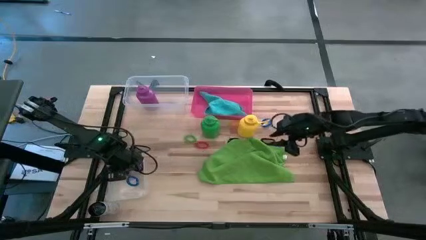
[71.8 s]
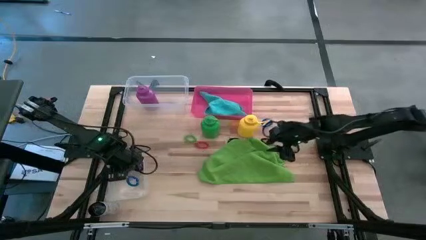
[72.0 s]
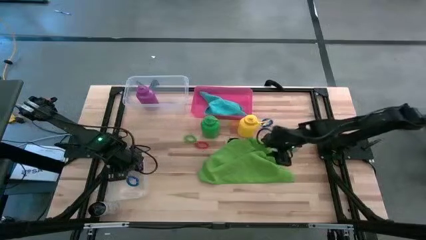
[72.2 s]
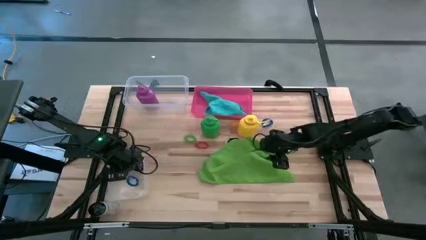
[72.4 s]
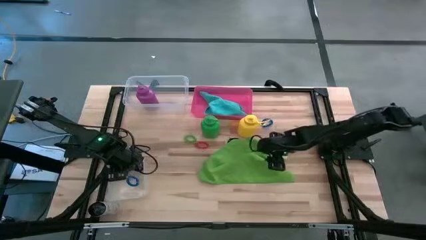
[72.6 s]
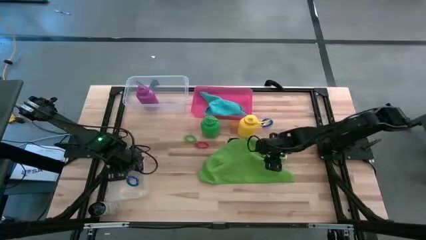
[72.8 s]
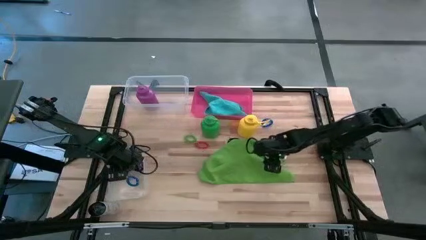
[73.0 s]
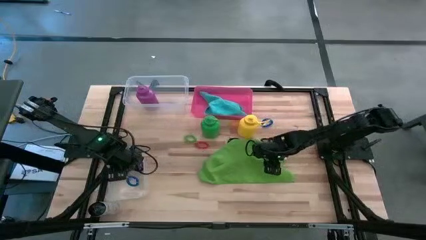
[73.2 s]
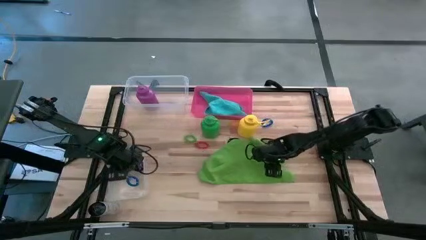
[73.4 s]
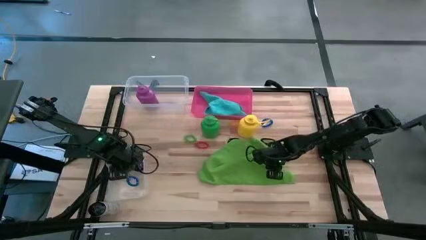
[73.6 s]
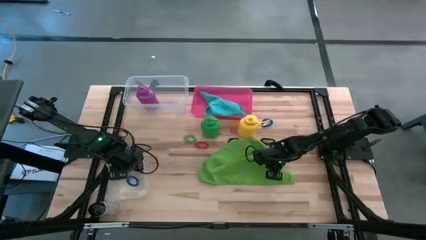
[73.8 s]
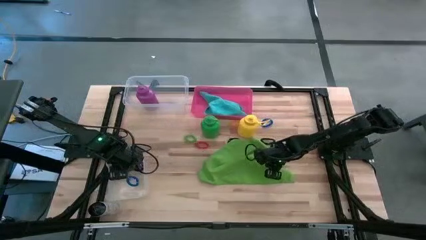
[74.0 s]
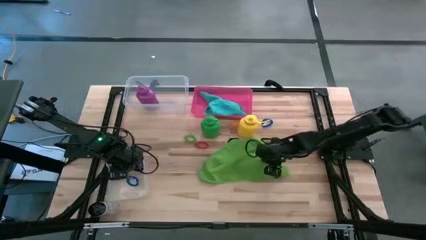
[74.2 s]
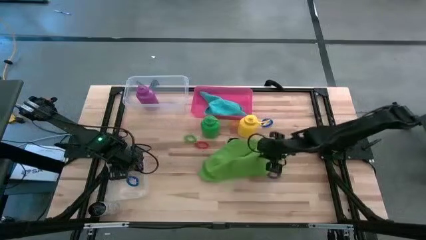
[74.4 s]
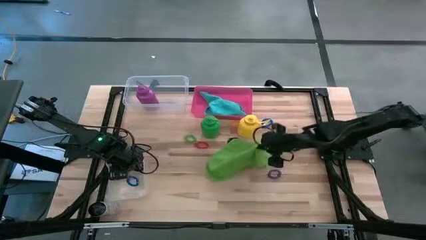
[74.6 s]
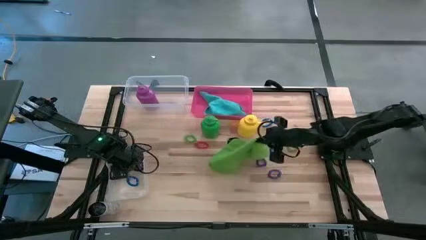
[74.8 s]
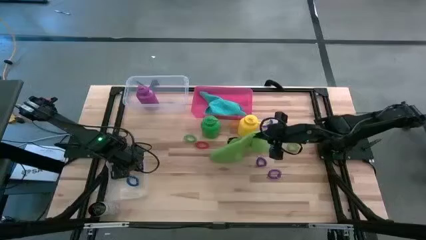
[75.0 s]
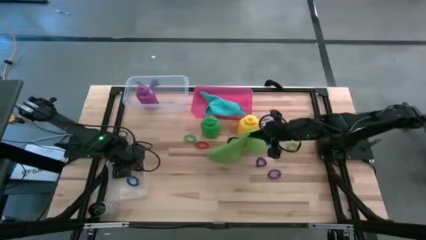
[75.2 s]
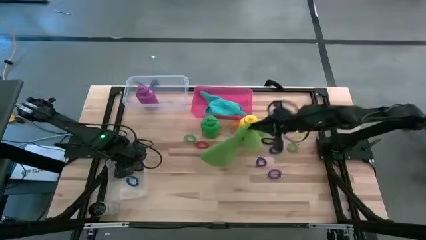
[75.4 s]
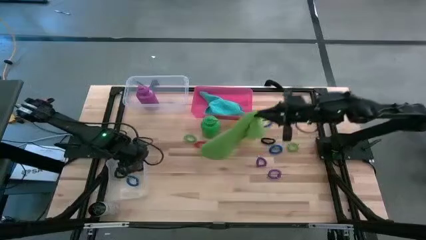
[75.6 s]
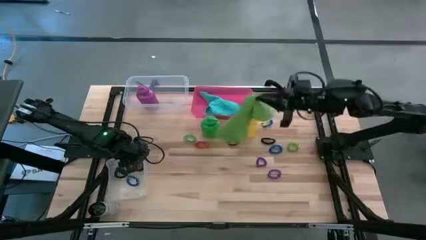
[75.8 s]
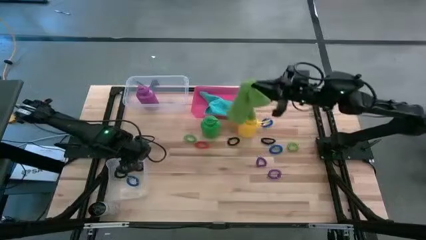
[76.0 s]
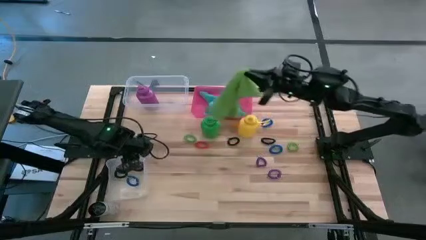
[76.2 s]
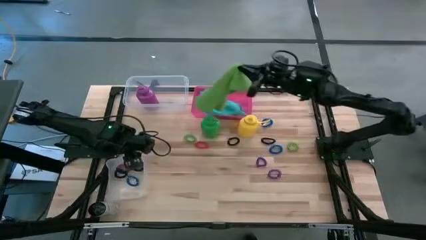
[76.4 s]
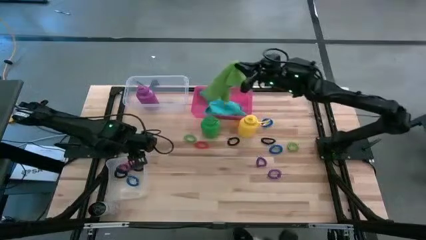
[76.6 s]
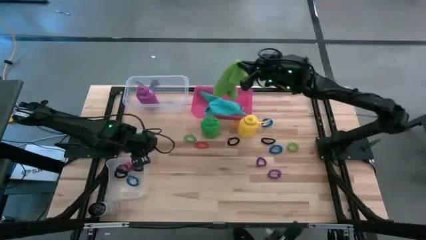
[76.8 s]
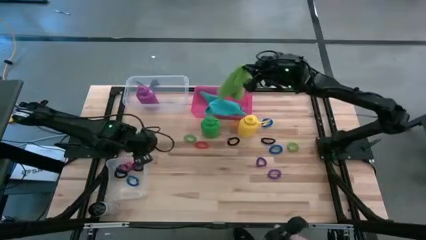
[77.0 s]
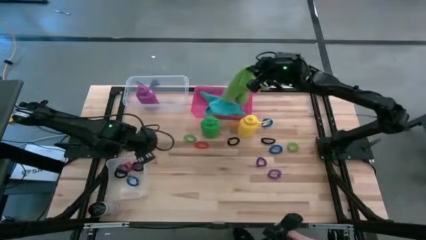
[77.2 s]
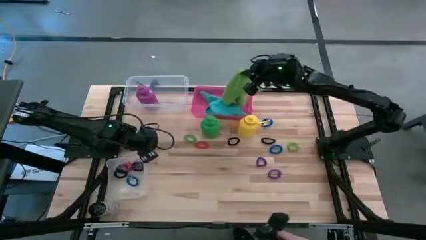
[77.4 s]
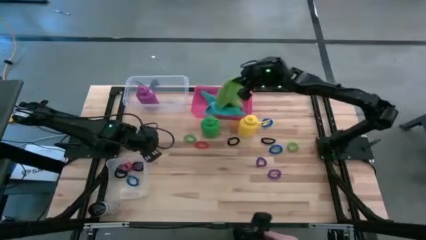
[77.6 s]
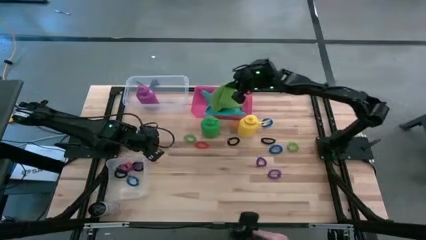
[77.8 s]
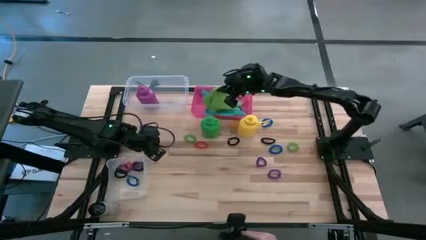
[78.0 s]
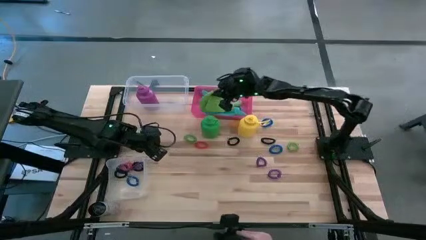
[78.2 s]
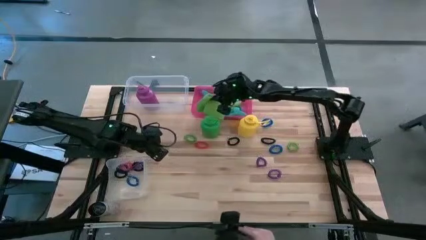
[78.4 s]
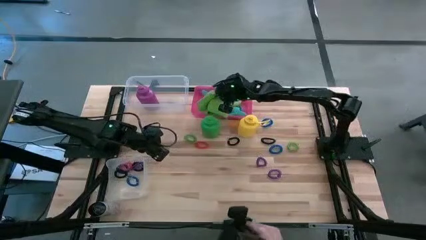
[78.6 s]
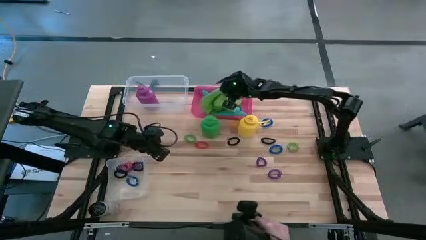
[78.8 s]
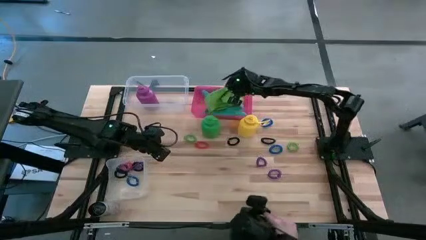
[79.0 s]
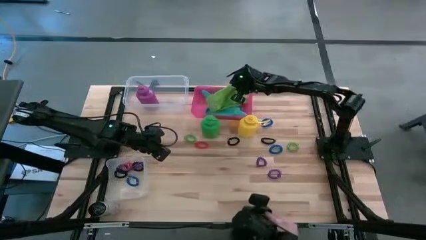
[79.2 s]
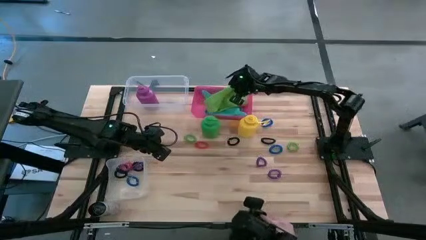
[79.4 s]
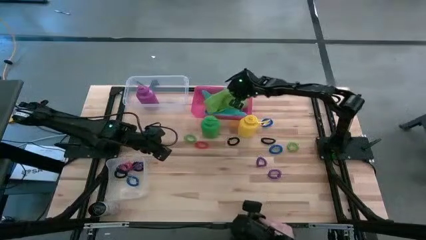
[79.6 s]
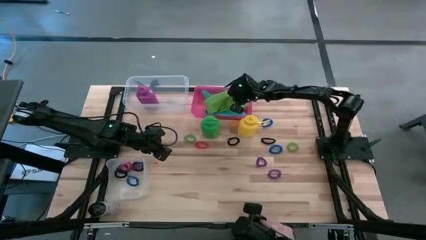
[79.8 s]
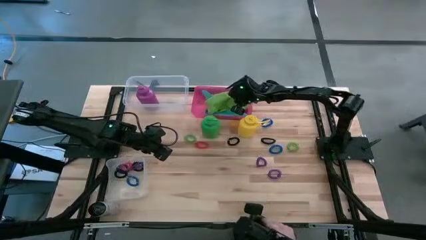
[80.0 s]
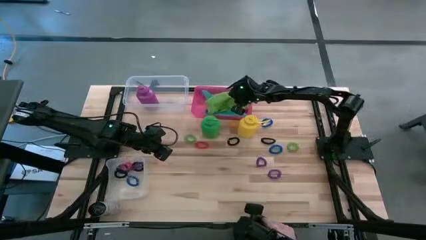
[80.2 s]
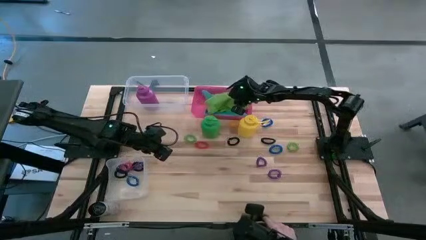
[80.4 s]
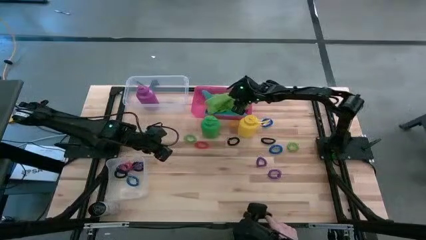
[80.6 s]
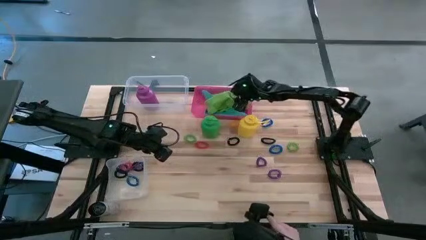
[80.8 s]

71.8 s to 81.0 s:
Task: Pick & Place Sports Items
Put the green towel into the pink bin

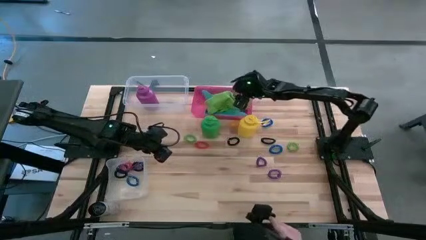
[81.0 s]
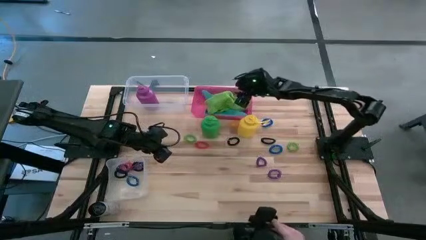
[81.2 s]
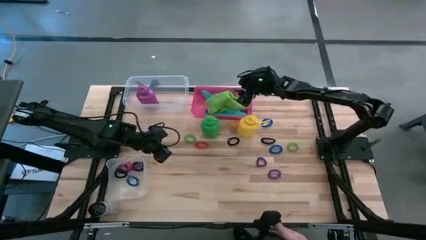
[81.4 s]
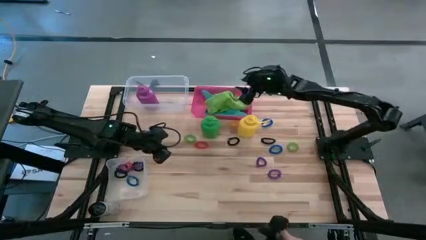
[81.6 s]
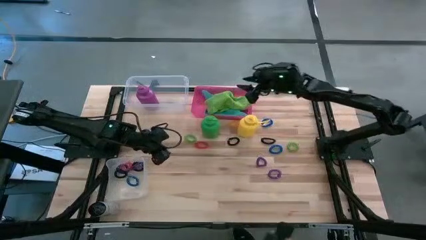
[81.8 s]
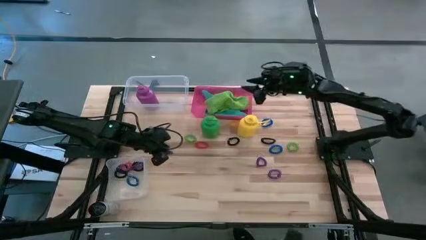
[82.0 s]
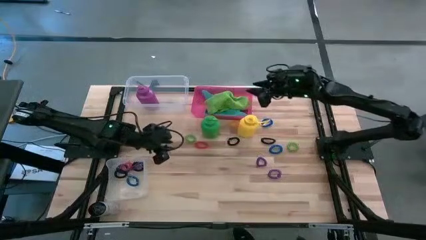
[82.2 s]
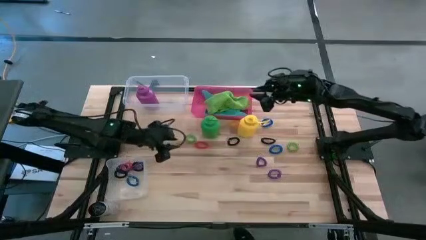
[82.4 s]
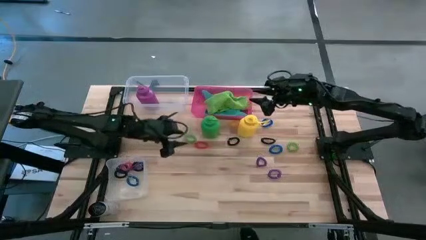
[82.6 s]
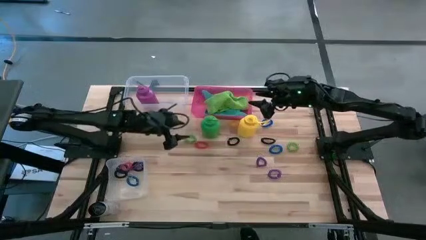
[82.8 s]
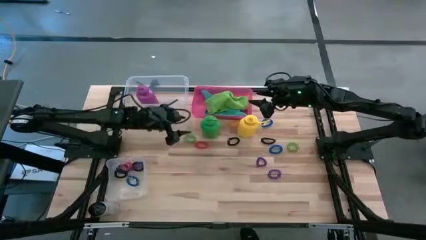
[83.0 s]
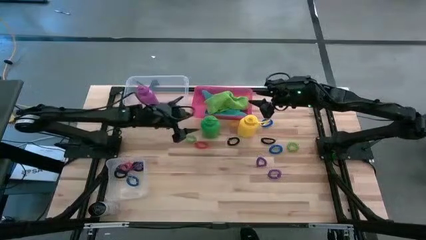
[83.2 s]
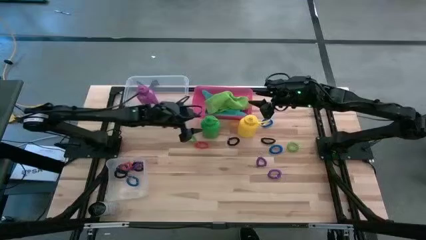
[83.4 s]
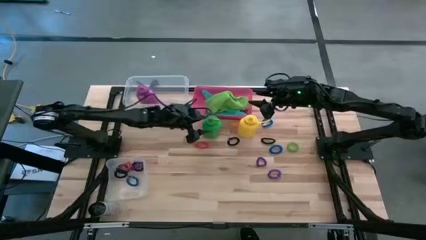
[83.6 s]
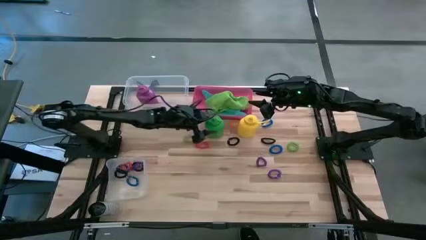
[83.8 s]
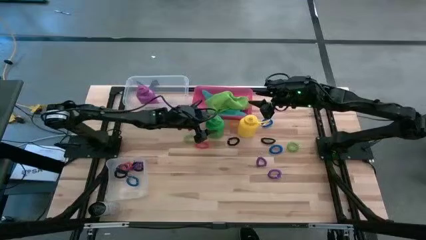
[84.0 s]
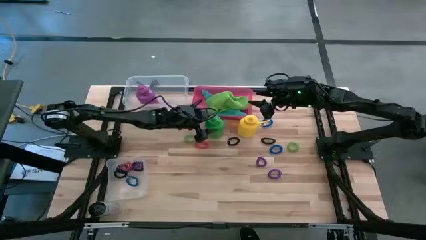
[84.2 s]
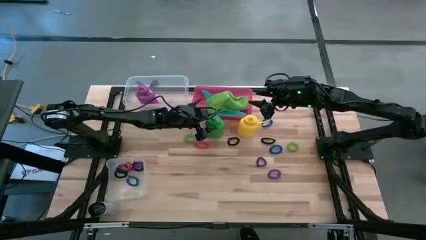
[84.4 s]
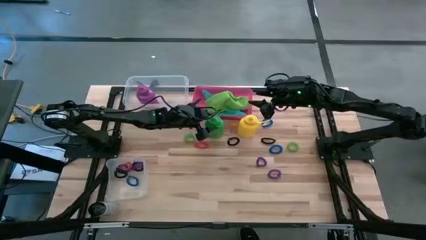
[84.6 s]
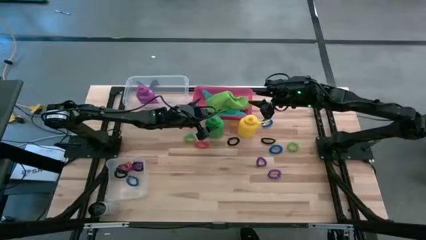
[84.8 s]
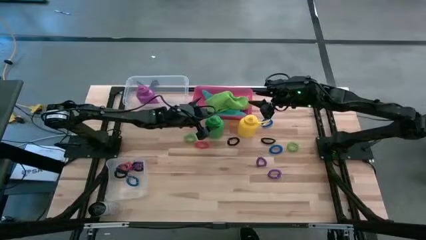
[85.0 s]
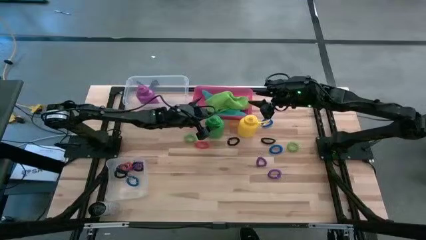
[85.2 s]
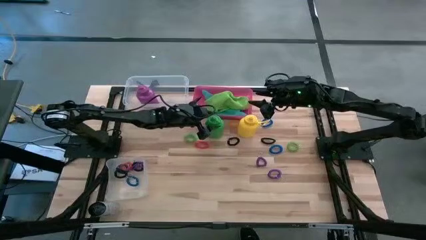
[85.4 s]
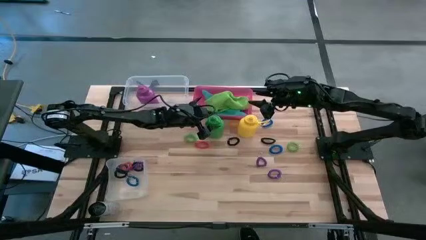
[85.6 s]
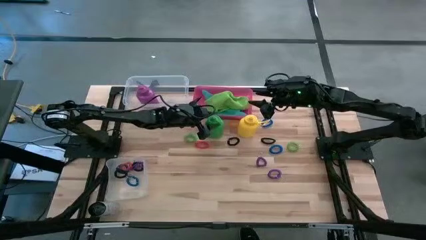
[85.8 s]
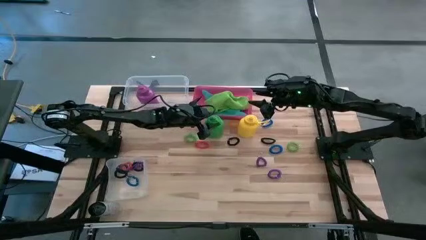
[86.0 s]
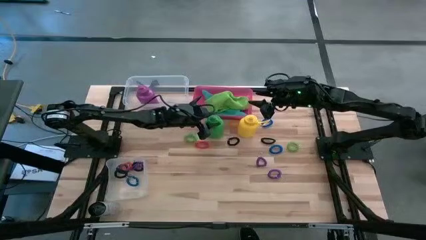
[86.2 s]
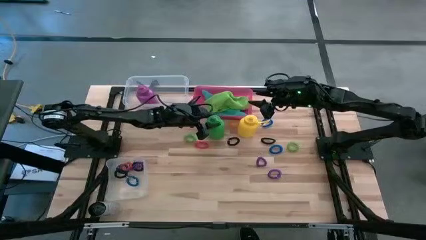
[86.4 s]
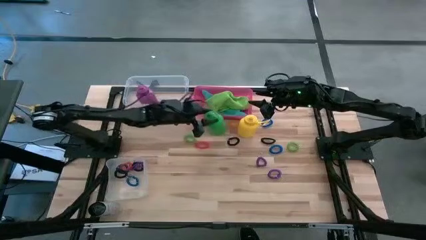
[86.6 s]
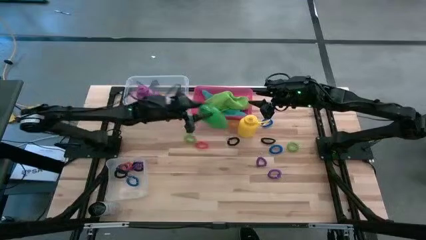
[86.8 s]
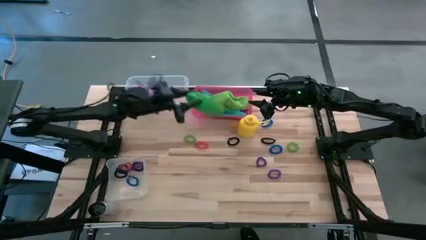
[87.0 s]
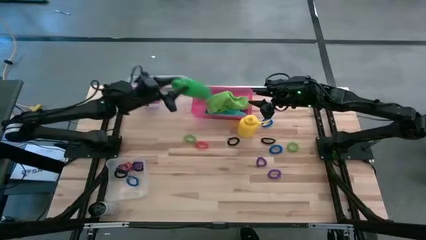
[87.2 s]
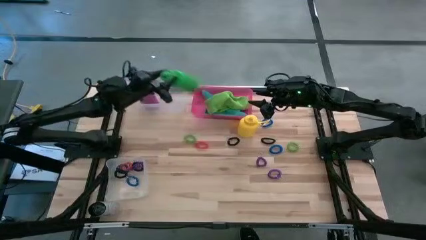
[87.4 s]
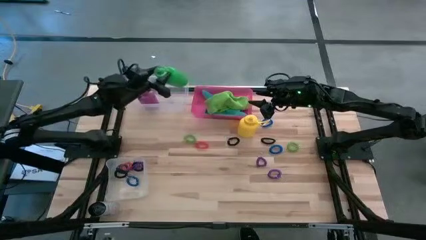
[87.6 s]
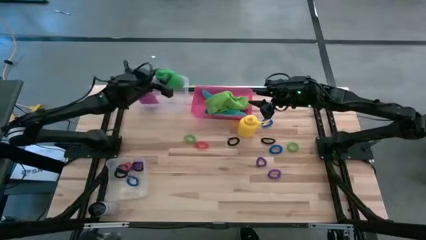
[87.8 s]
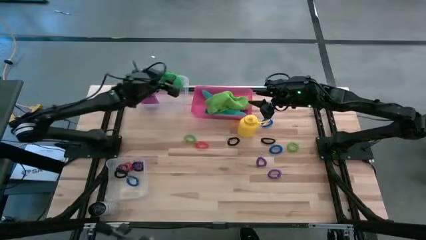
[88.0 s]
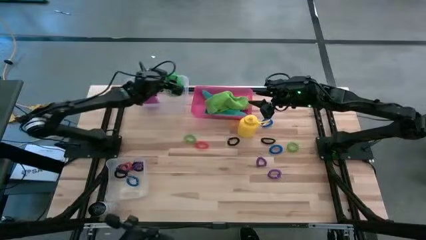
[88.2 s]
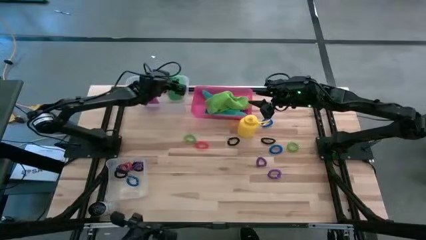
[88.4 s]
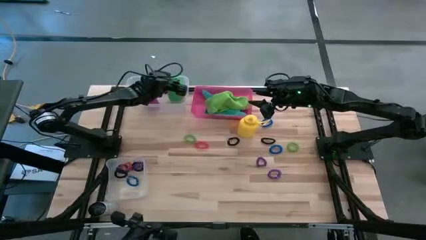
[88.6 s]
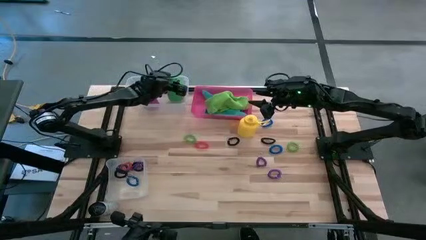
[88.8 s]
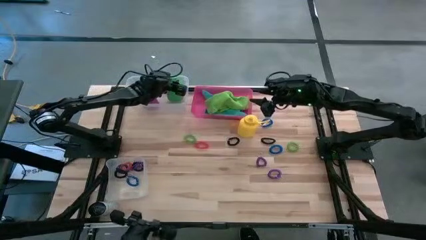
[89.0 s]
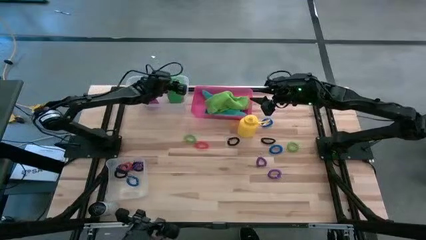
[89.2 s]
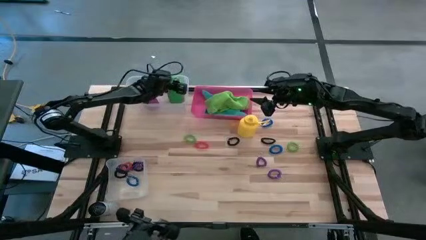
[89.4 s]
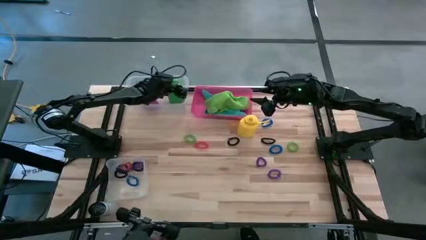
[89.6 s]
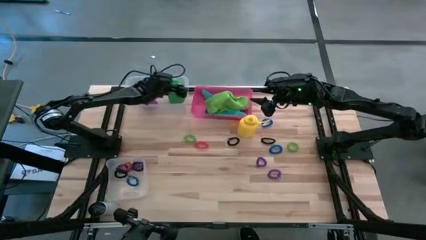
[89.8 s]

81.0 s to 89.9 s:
Put the green tumbler into the top transparent bin
